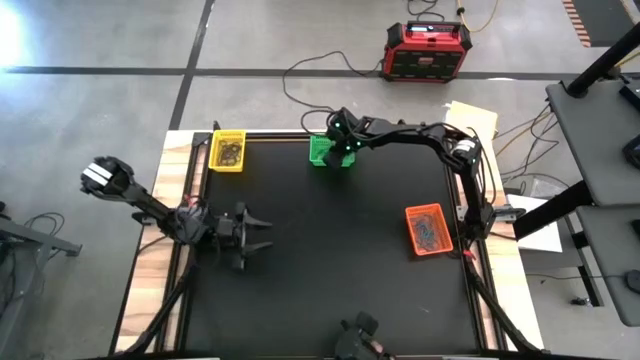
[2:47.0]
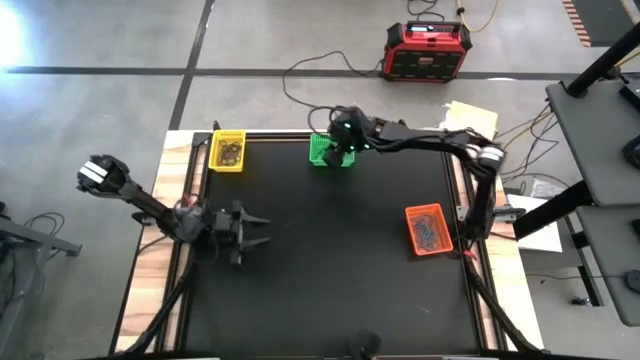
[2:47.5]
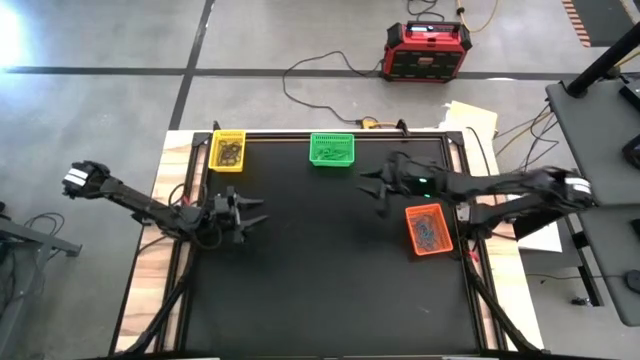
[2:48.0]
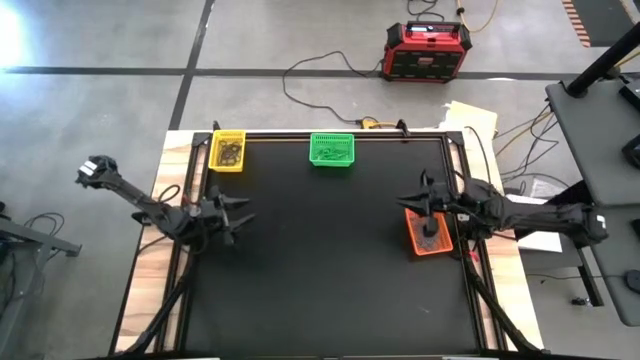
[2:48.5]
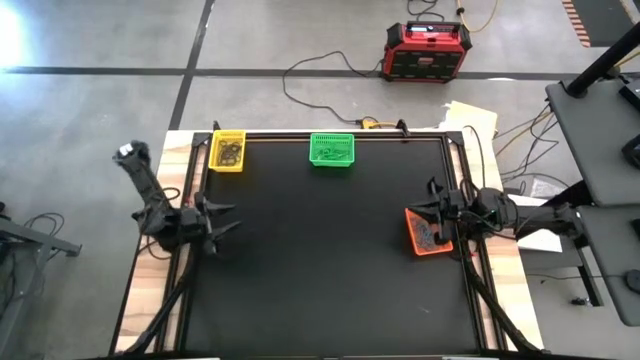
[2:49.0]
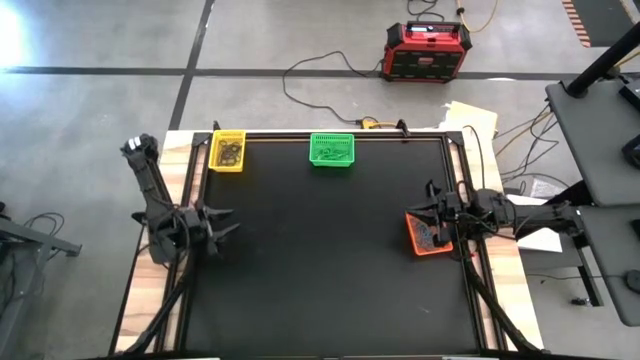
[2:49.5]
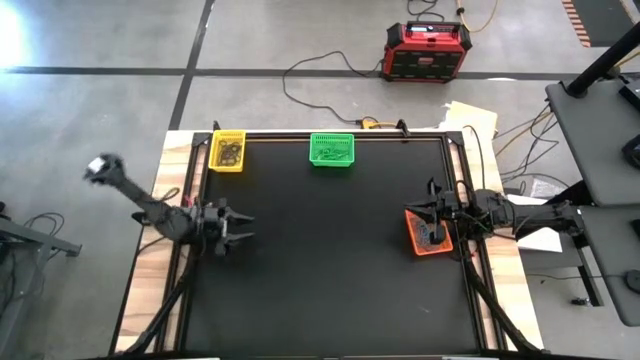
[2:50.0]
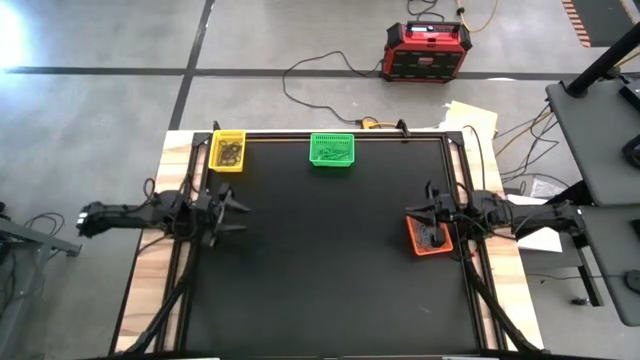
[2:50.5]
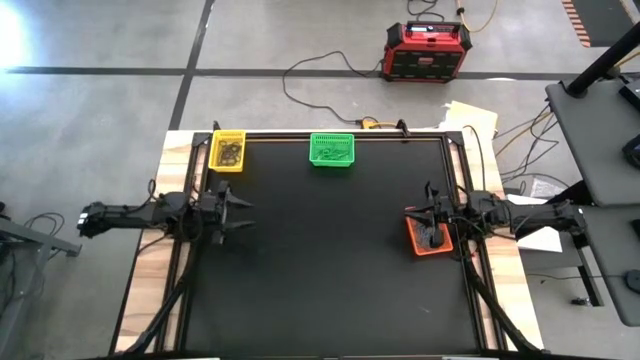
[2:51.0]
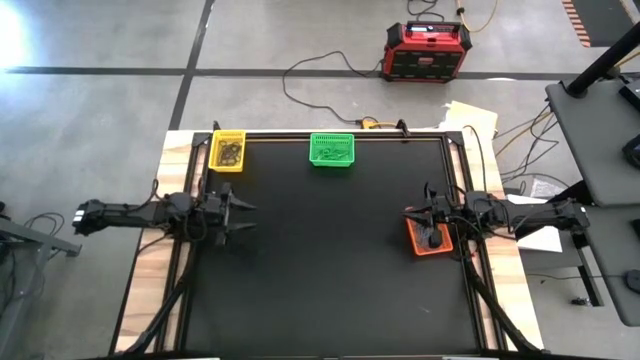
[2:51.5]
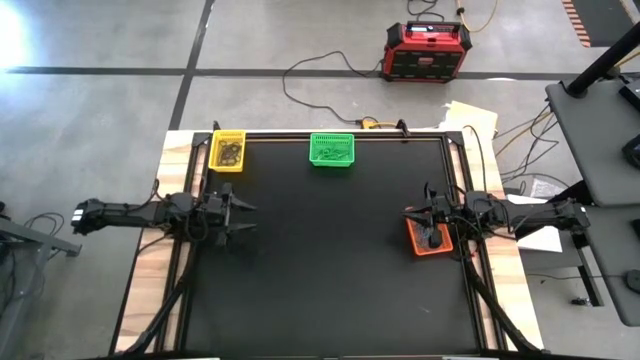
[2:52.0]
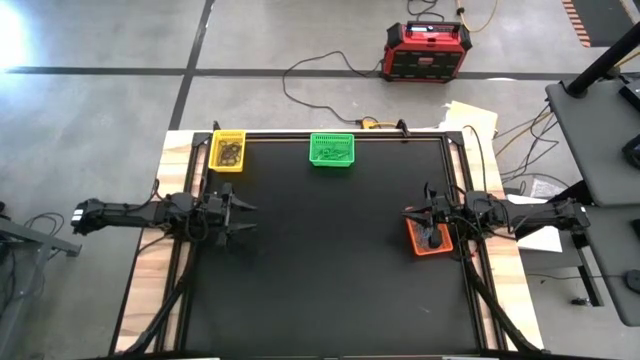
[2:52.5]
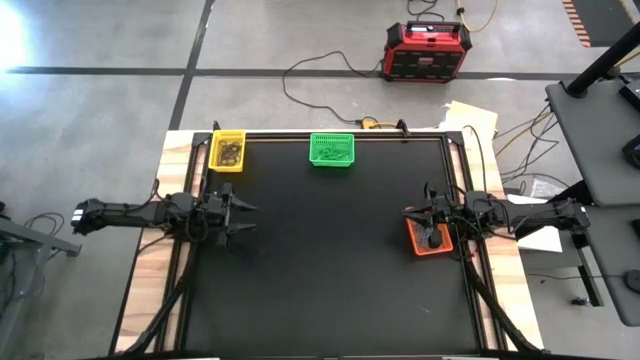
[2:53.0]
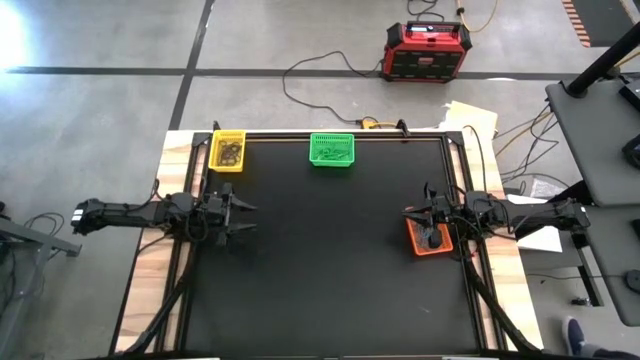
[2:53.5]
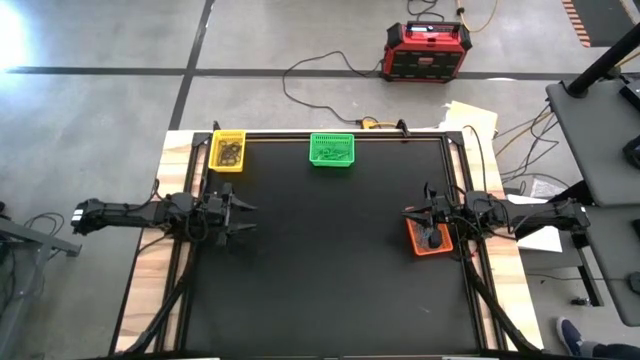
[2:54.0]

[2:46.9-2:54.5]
Task: Sort rubber bands into baskets
Return to Home Position

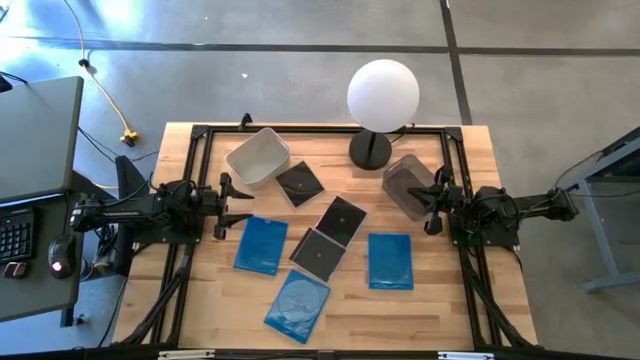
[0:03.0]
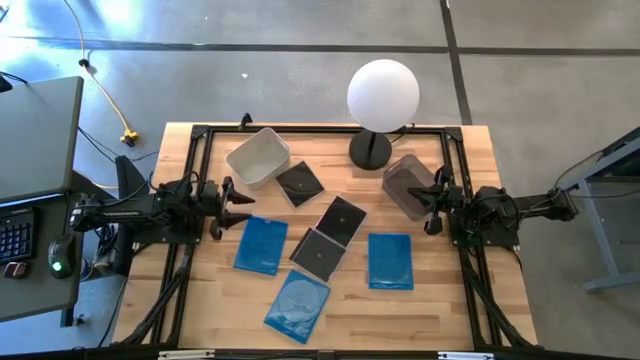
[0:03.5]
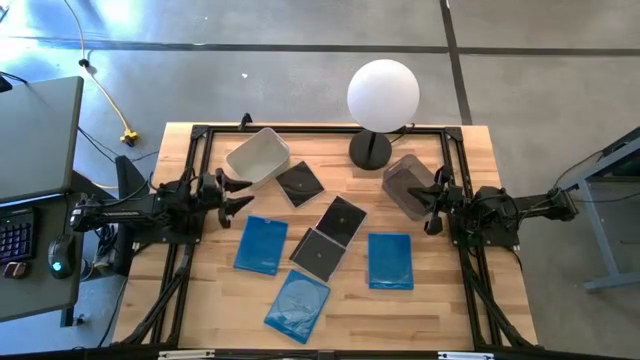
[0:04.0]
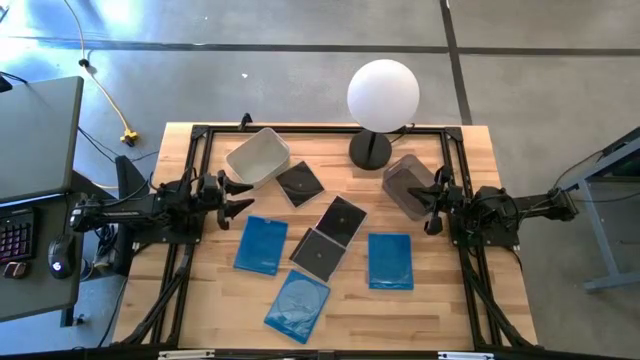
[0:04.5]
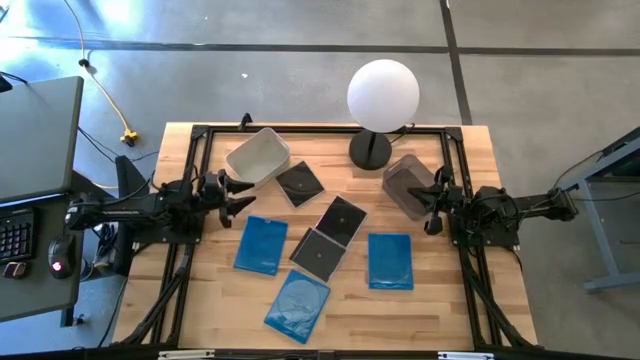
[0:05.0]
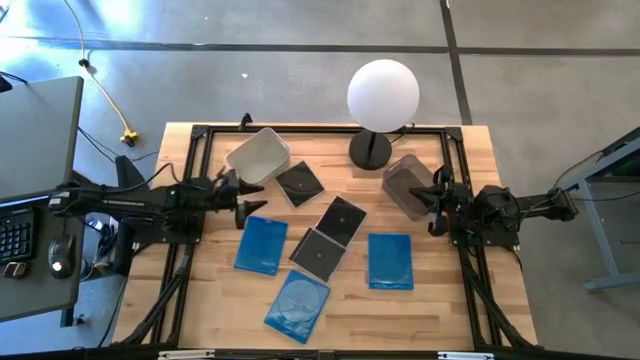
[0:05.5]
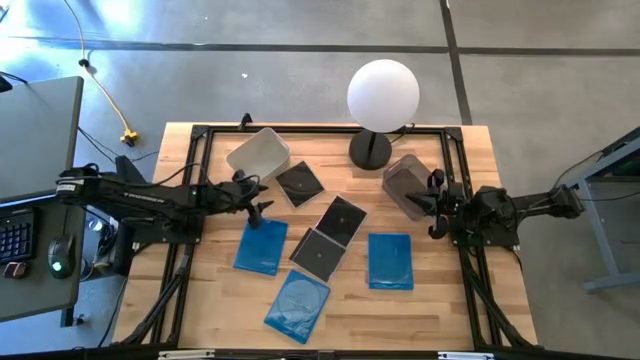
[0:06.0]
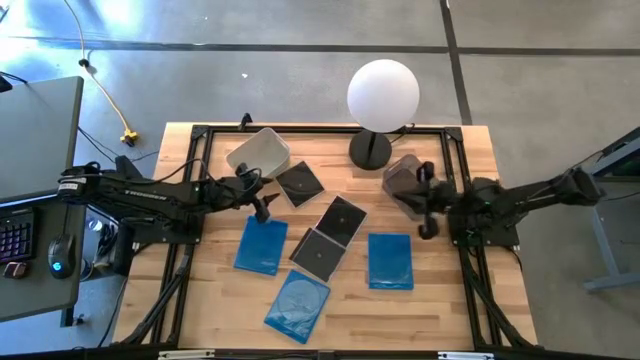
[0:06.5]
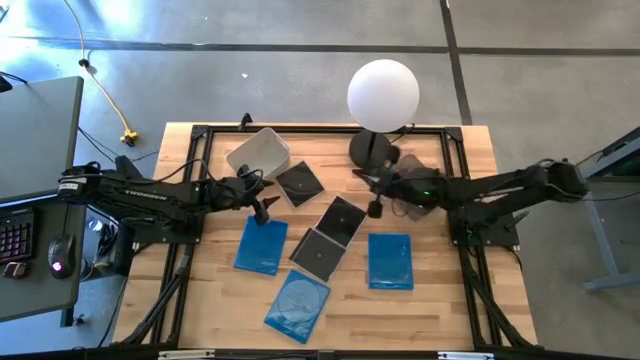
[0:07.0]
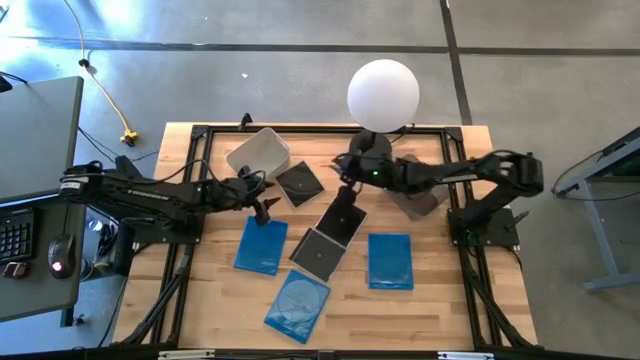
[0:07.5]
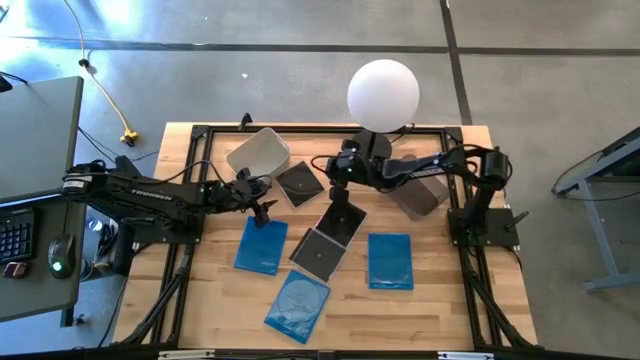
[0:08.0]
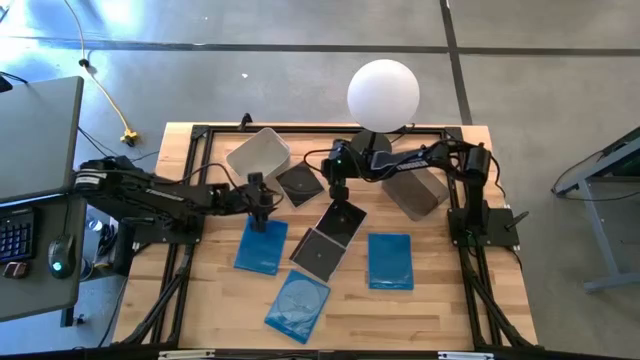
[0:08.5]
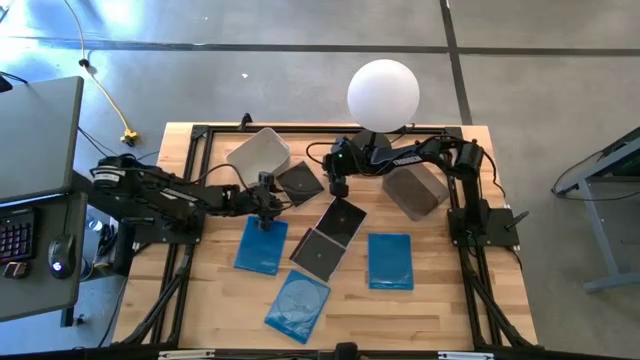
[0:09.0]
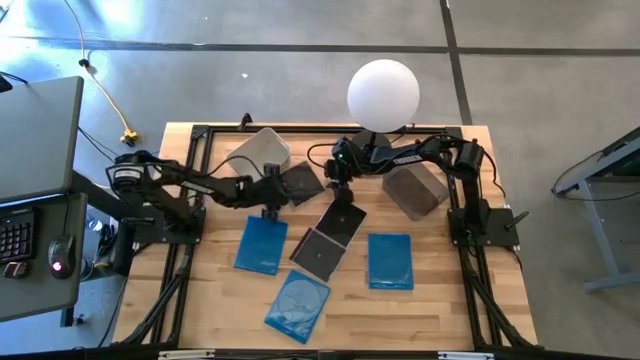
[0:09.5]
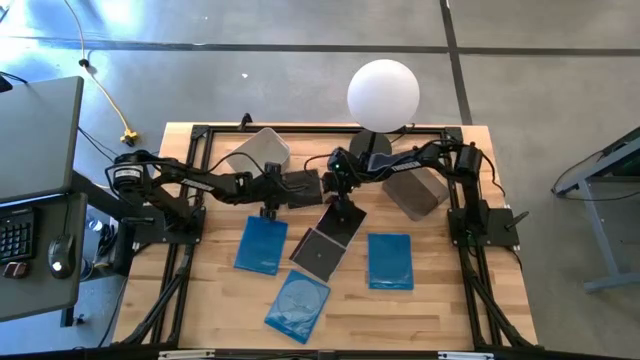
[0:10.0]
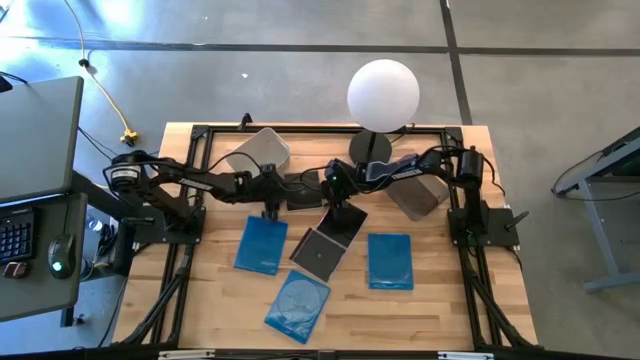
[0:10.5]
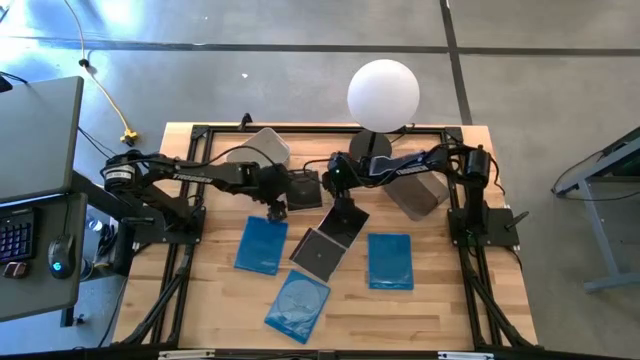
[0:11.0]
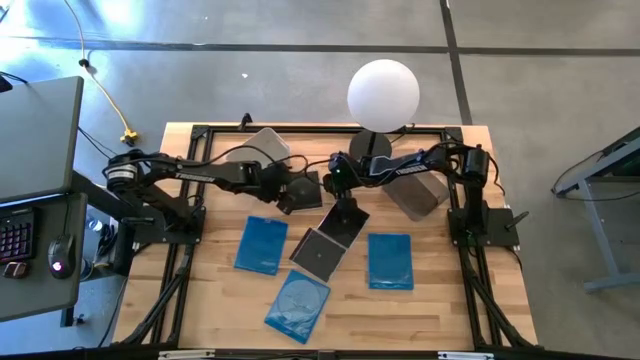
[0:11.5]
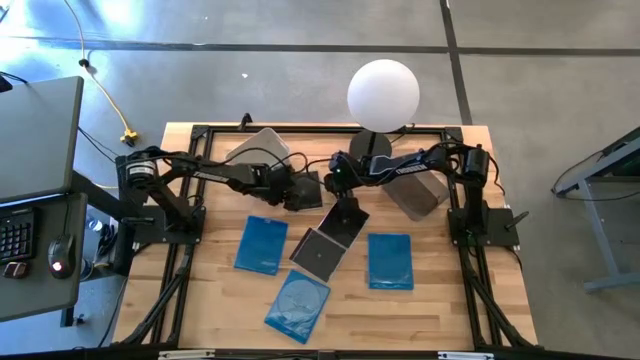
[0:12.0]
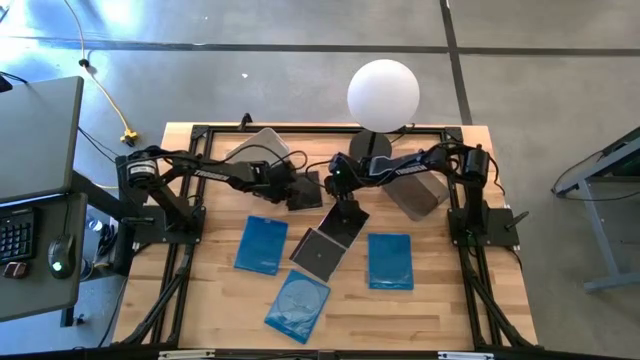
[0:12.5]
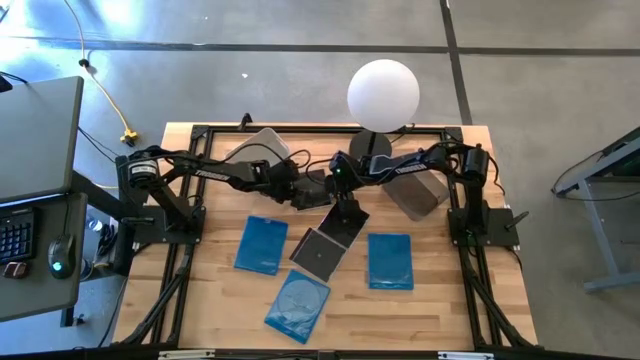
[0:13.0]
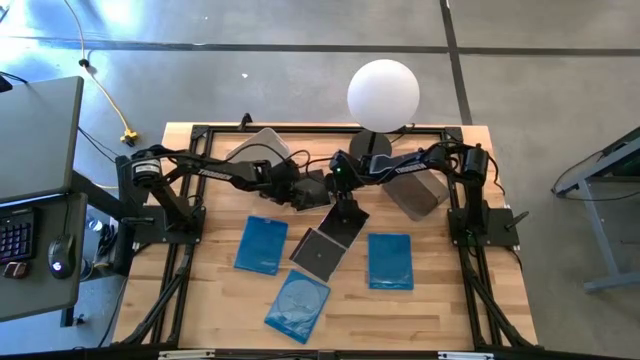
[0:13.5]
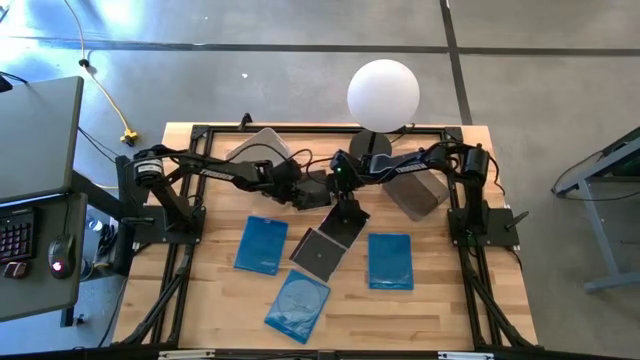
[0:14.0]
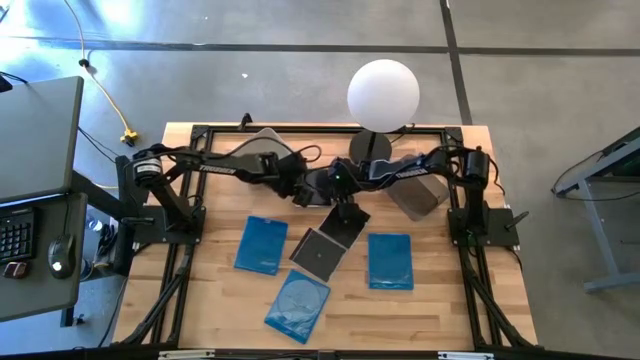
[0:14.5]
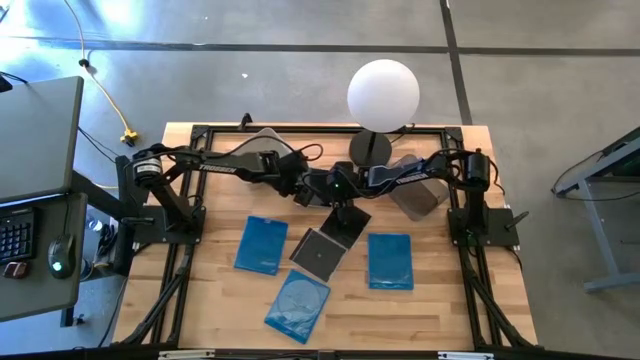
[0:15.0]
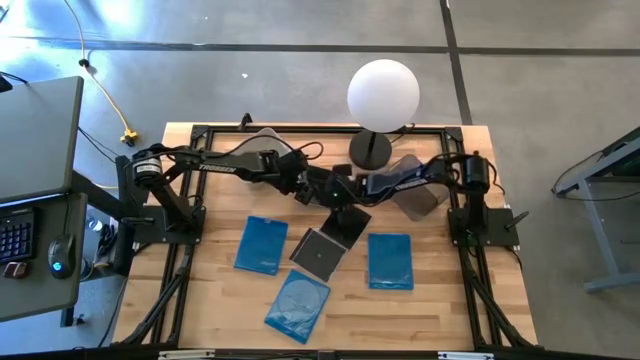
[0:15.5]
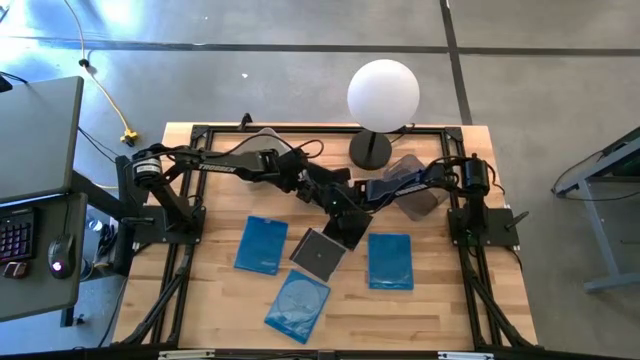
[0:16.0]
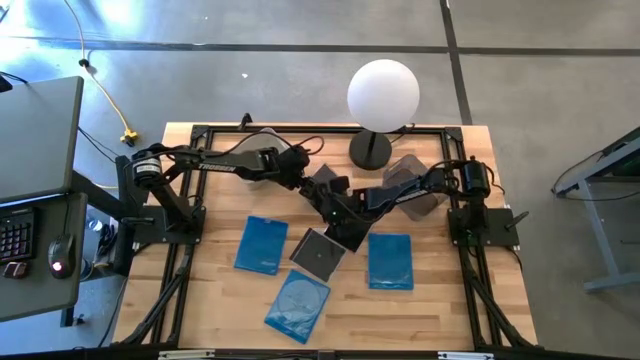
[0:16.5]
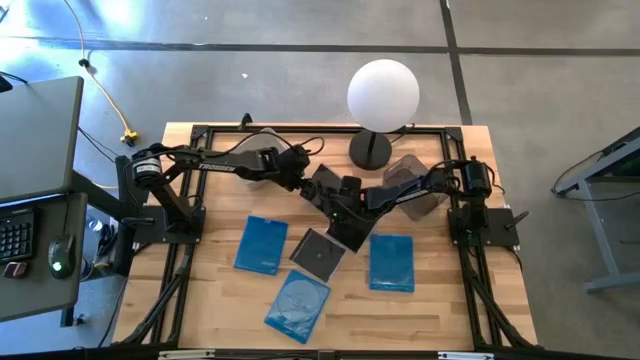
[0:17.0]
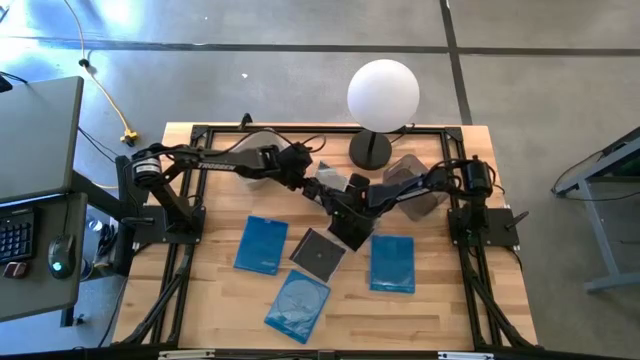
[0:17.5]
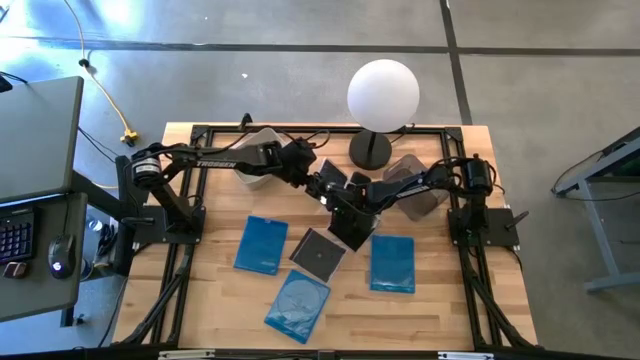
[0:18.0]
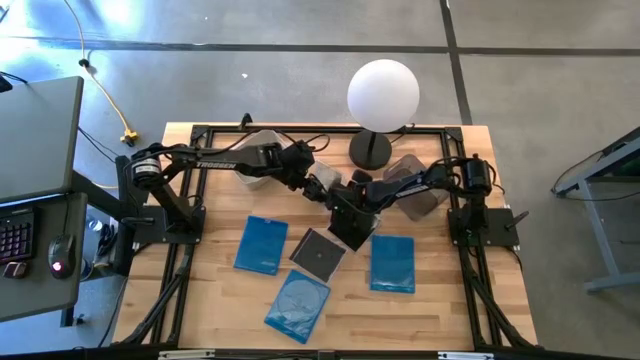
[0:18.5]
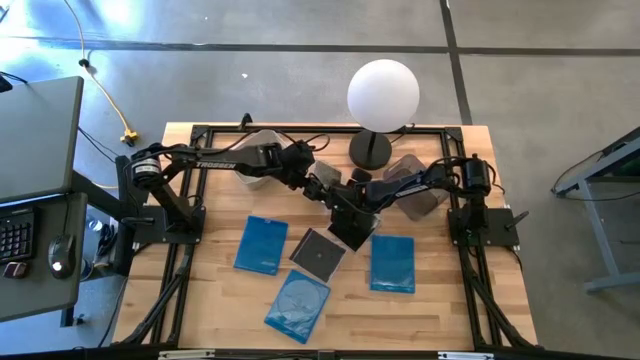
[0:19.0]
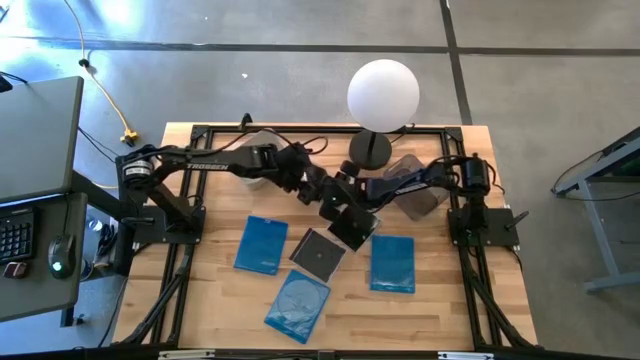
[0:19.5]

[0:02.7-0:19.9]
Task: Pick & place jewel cases by type
Put the top black CD case into the white bin
